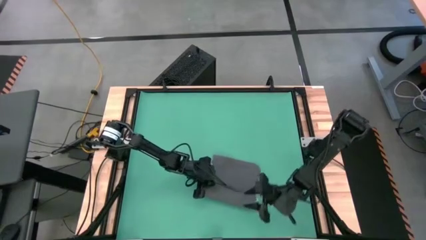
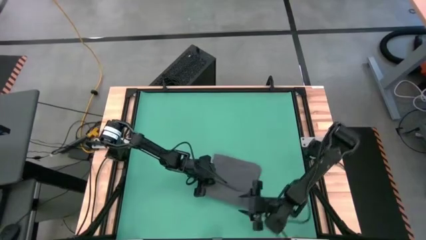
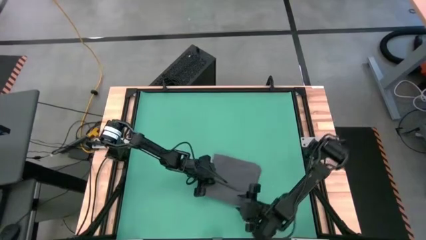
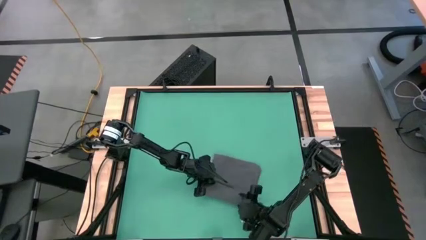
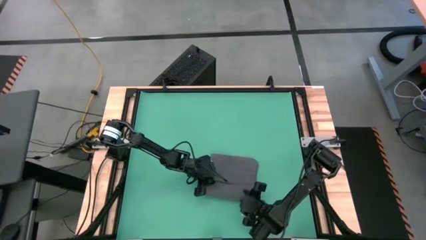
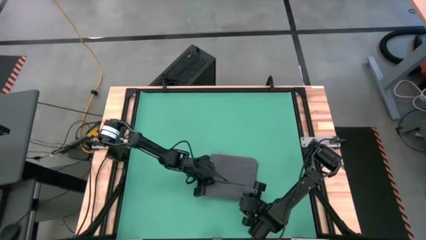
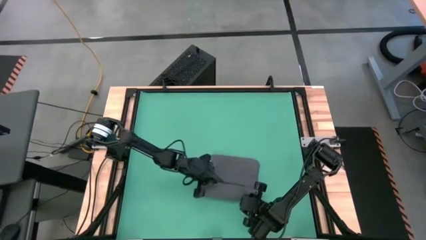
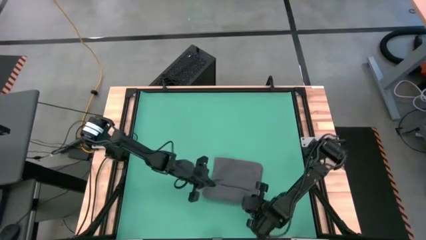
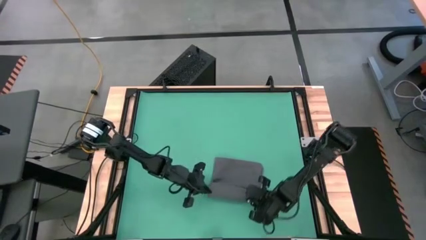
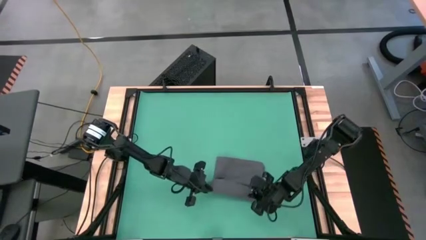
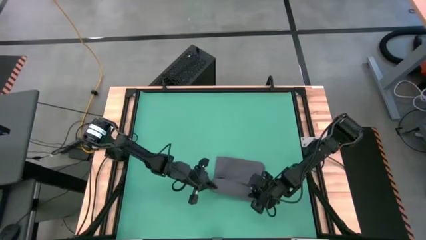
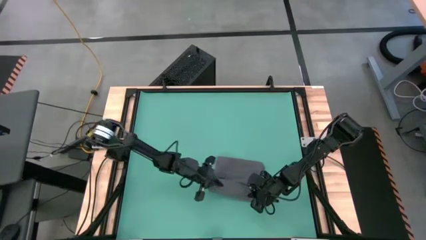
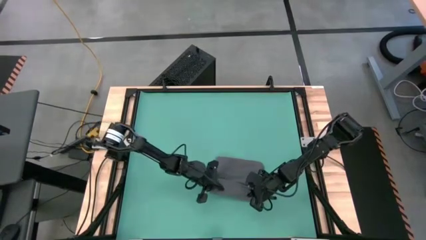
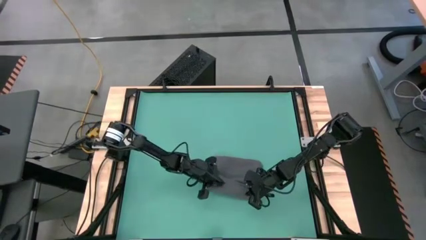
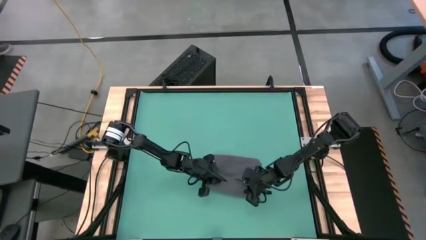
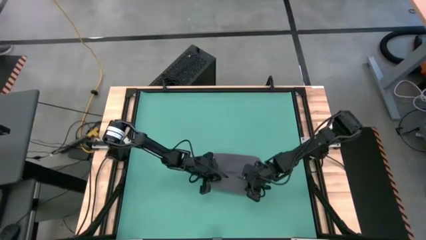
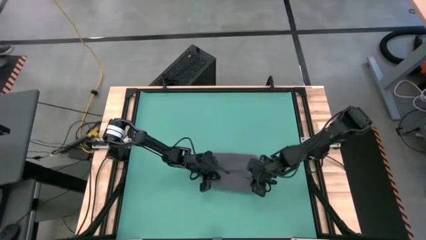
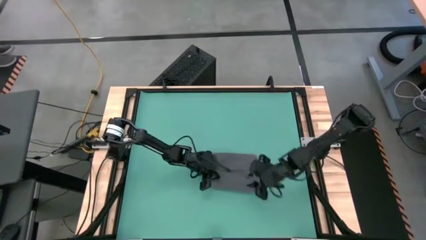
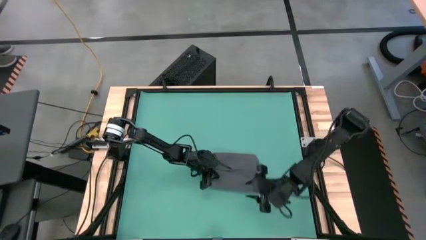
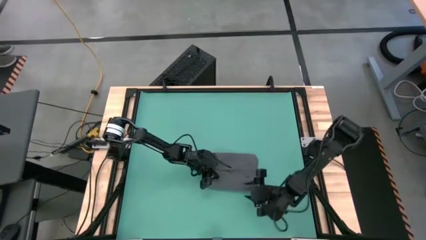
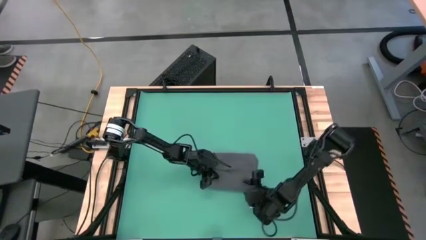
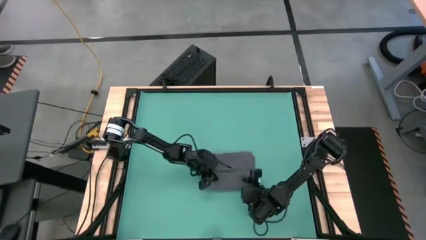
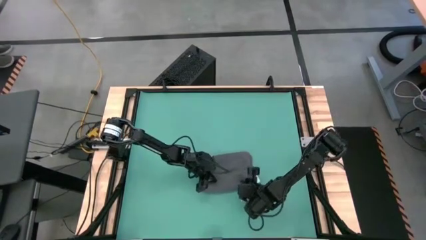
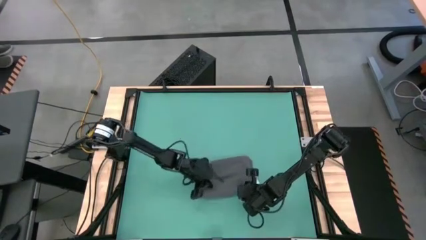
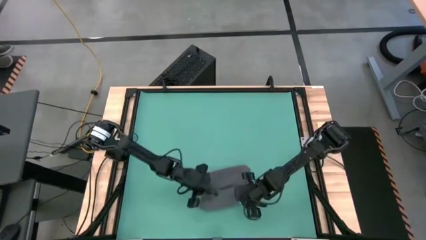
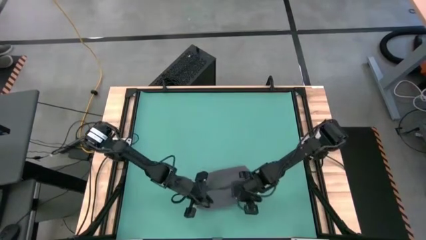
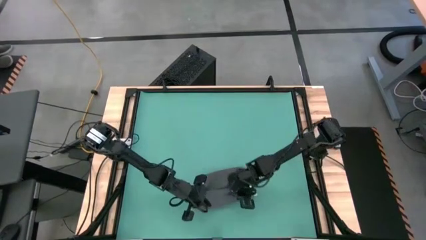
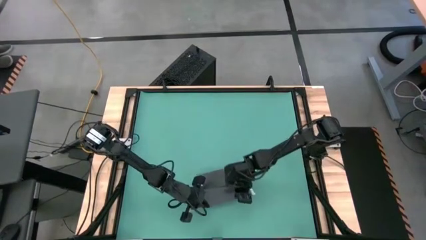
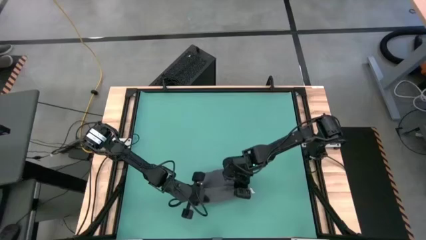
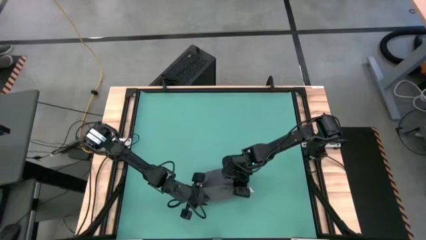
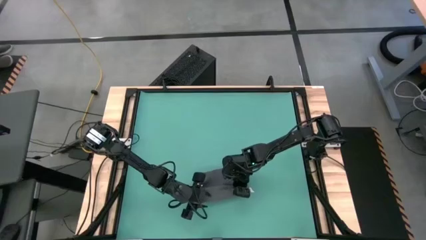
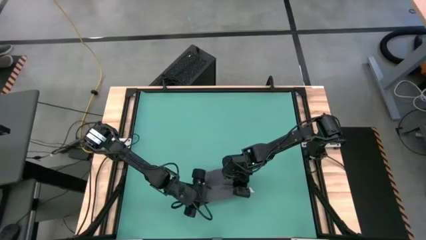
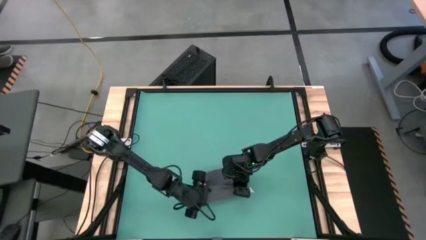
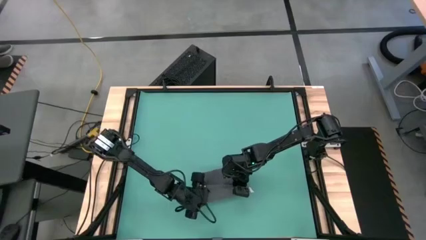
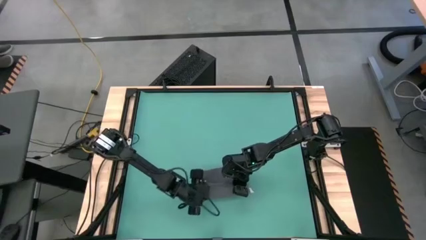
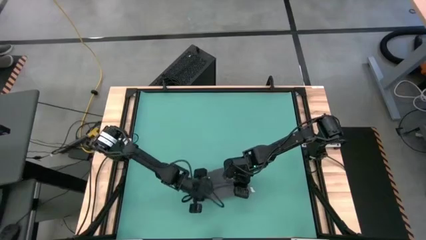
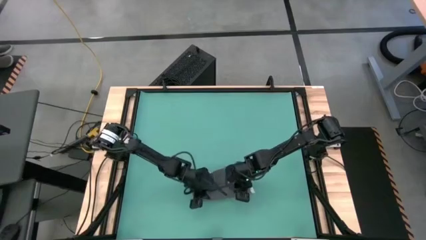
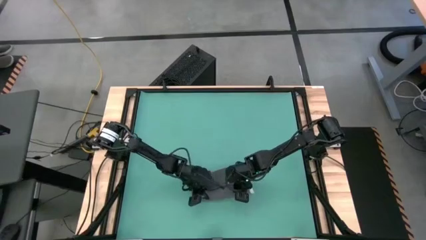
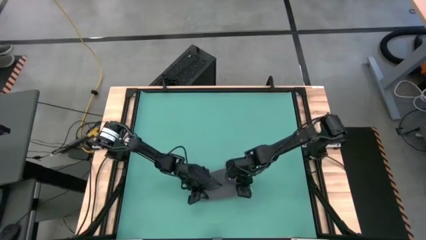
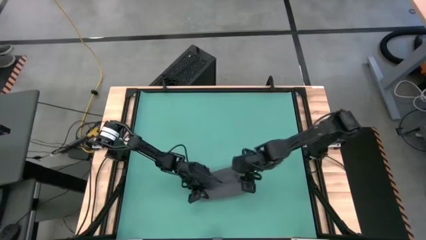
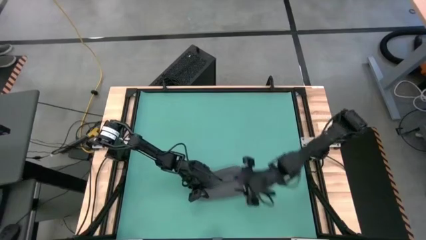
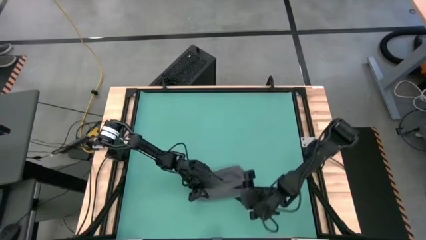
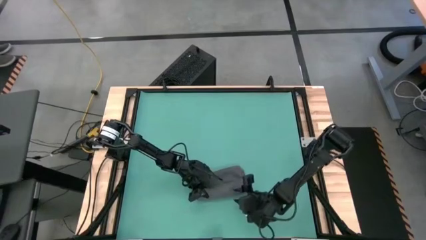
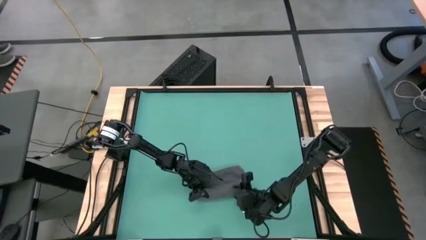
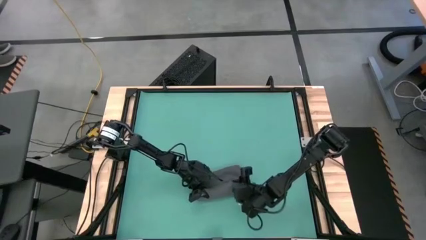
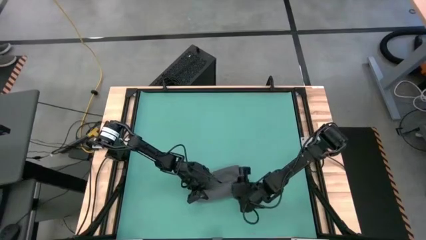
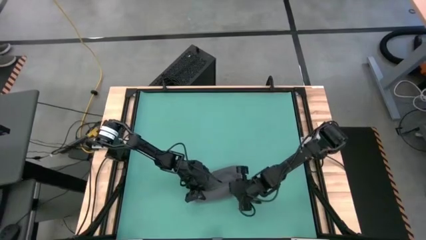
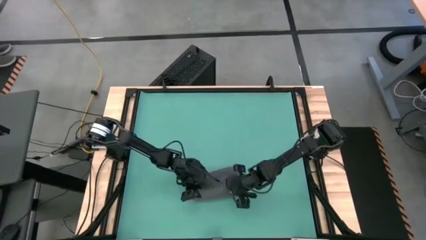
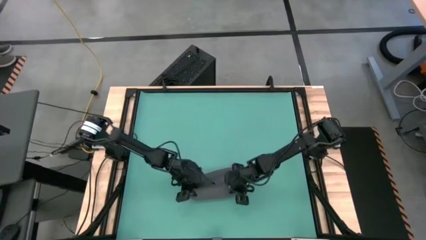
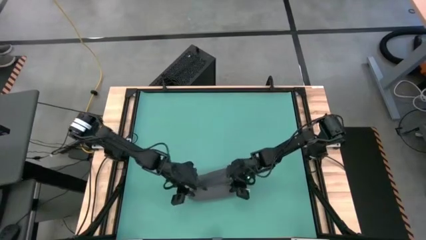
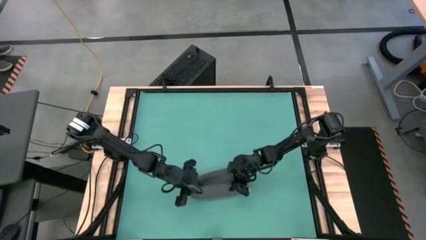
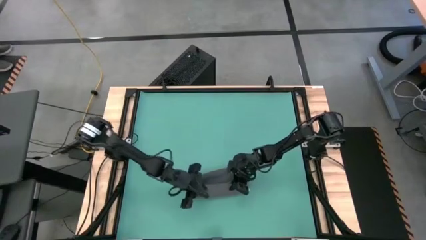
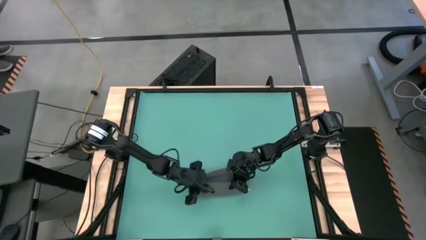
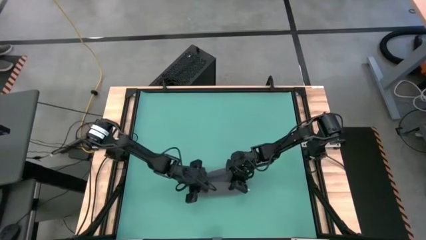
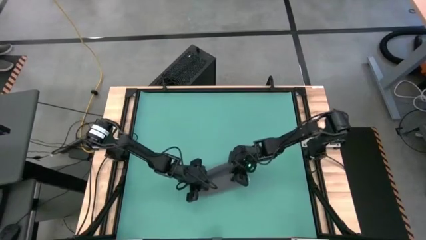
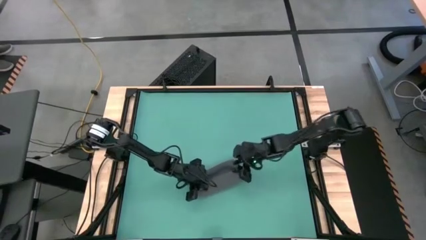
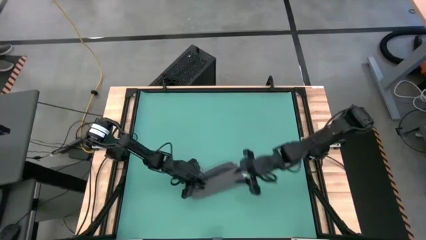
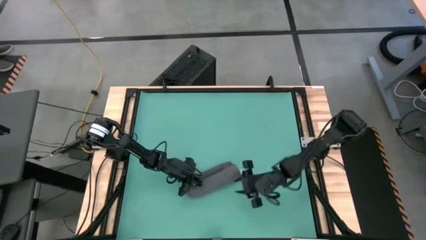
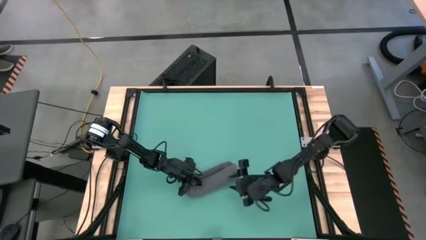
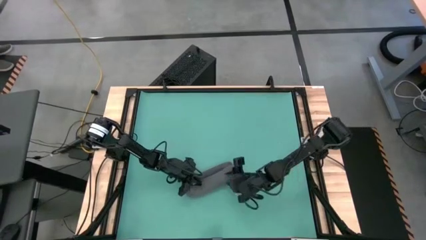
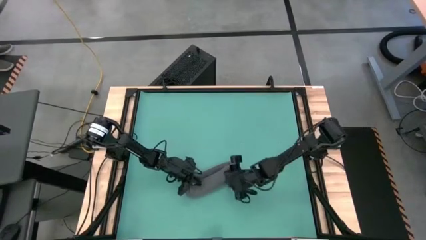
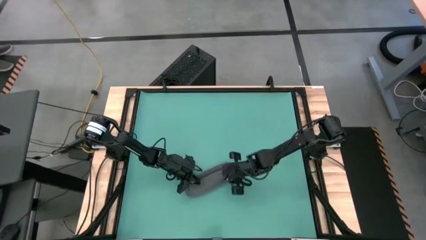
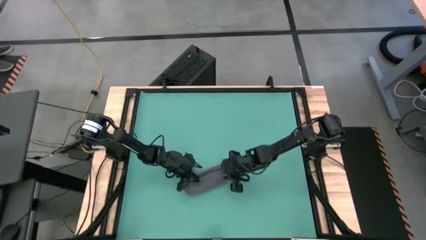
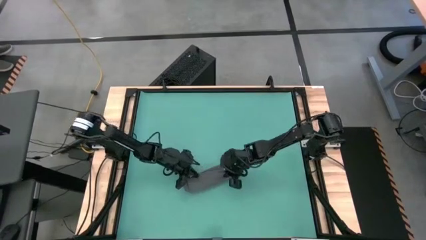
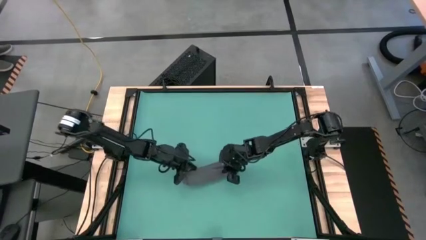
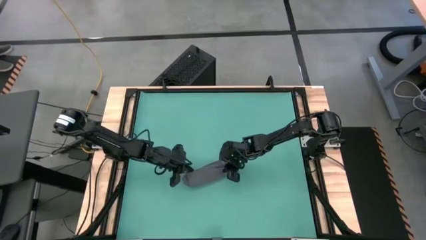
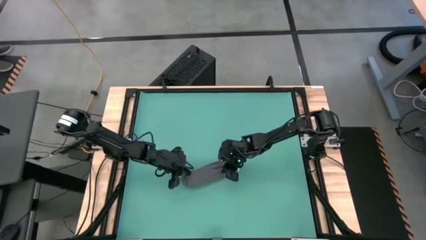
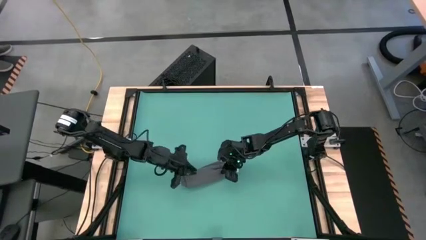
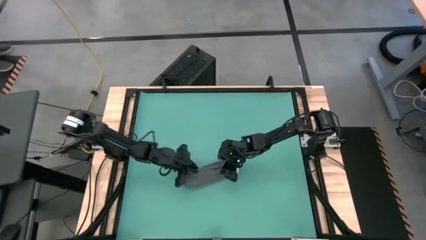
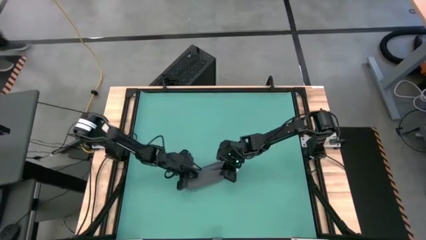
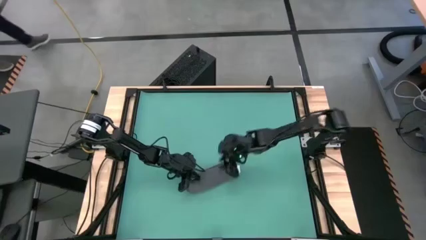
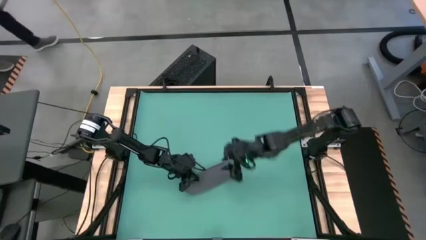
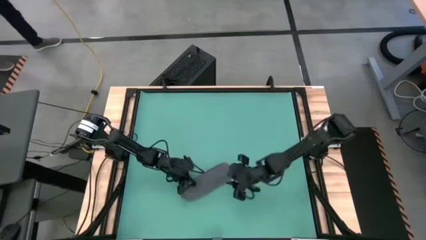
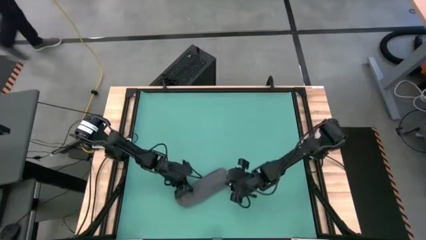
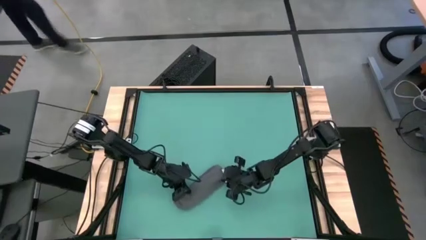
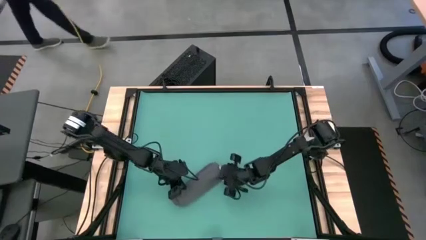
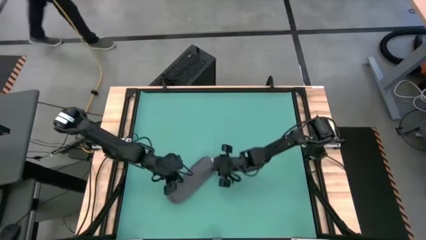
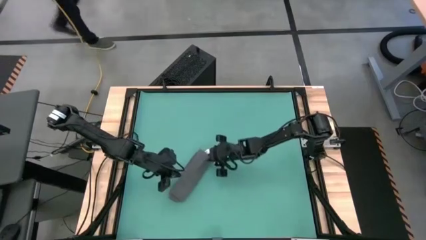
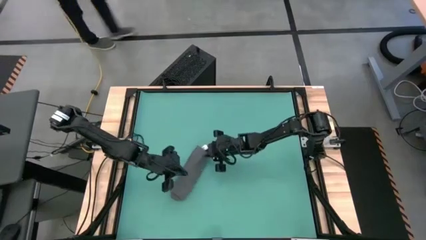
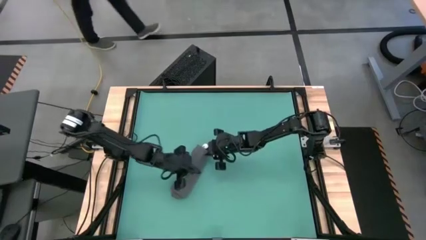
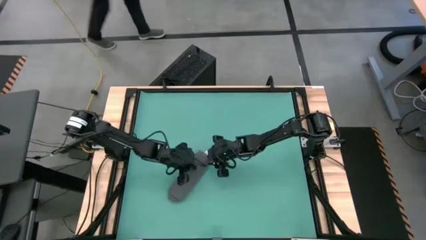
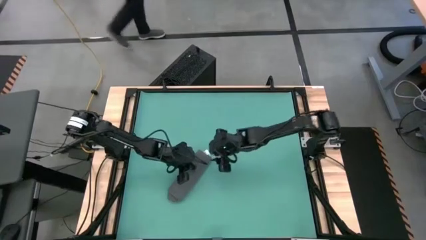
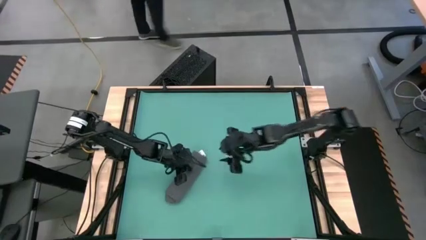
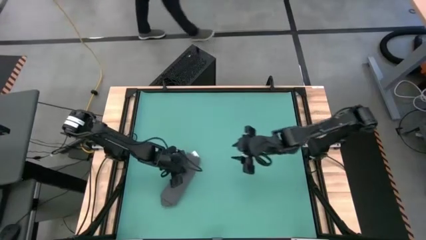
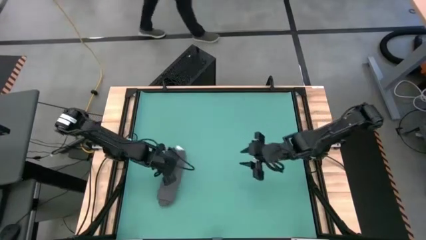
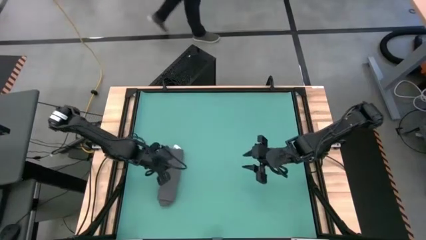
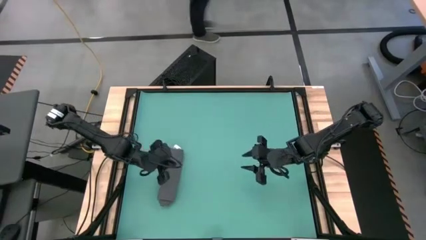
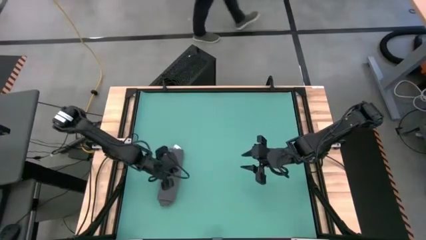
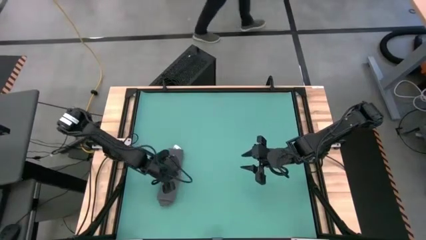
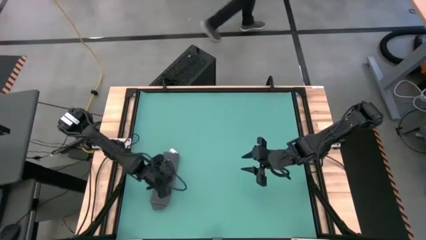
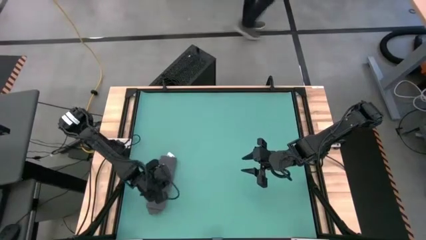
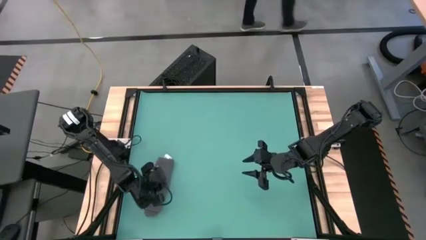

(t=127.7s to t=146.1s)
Task: Roll towel into tight, uniform cylinder
Roll the gray towel
